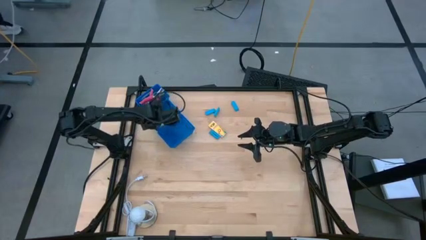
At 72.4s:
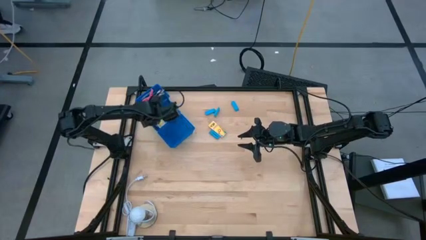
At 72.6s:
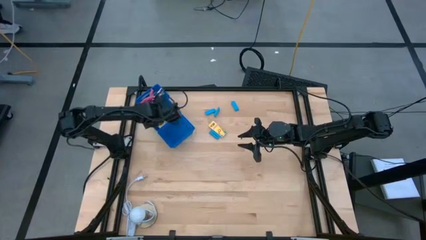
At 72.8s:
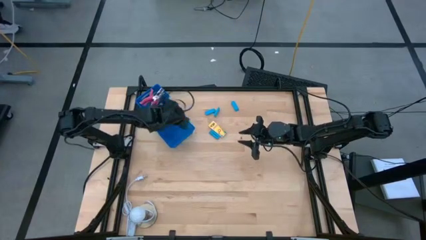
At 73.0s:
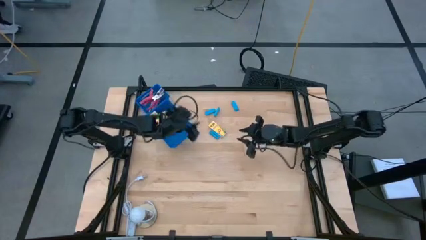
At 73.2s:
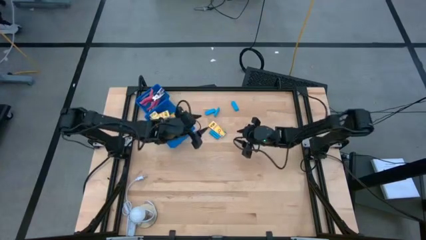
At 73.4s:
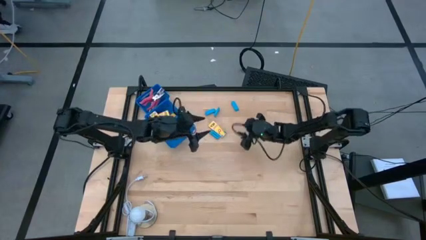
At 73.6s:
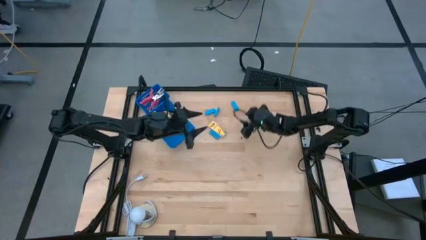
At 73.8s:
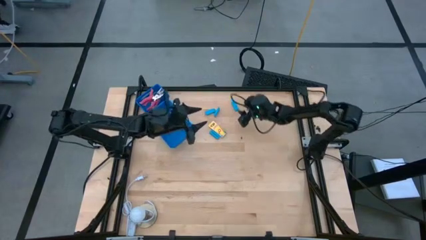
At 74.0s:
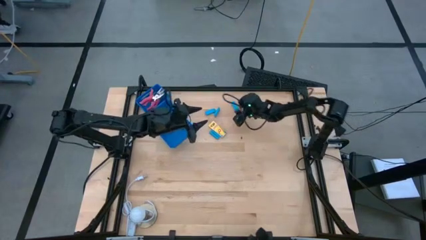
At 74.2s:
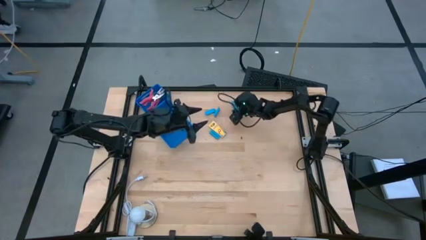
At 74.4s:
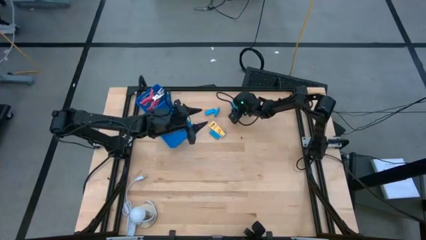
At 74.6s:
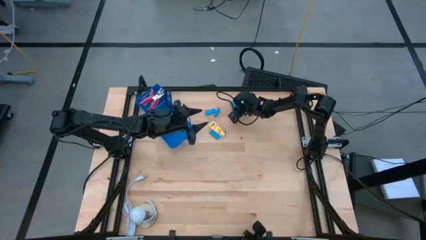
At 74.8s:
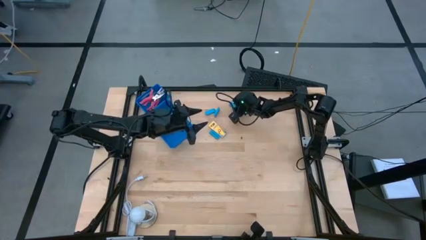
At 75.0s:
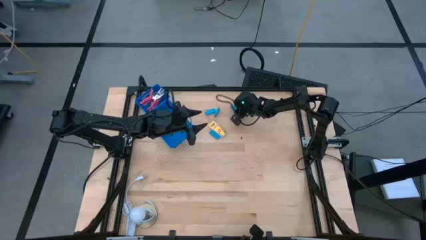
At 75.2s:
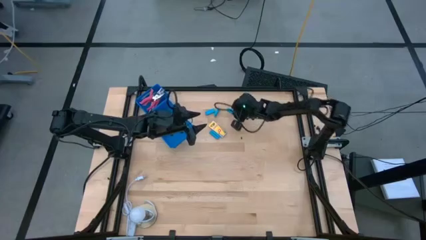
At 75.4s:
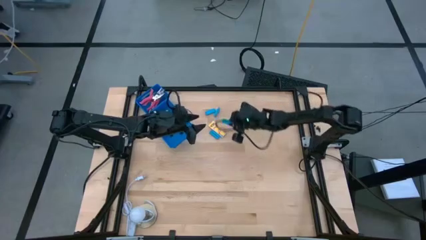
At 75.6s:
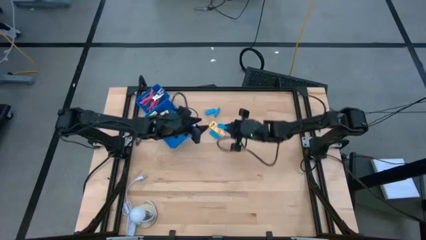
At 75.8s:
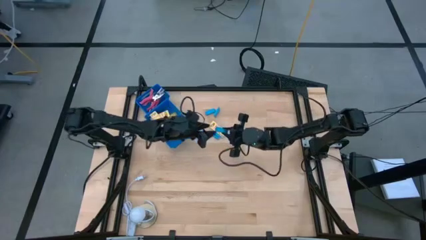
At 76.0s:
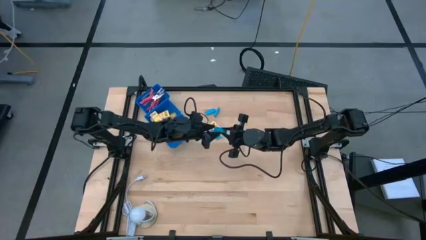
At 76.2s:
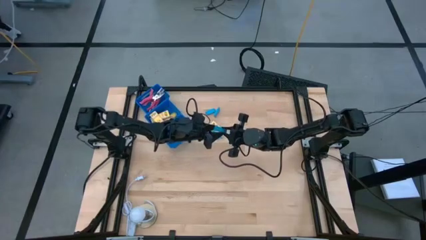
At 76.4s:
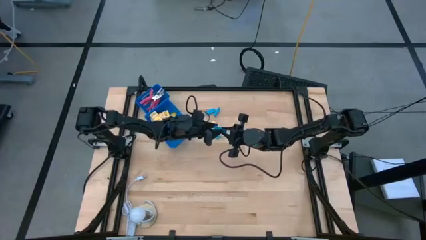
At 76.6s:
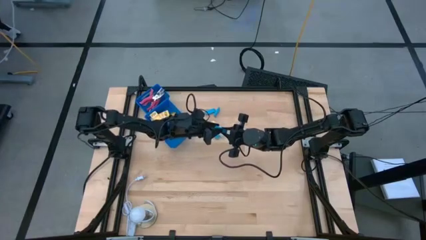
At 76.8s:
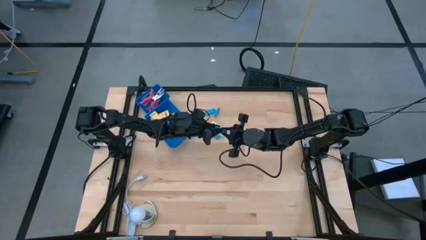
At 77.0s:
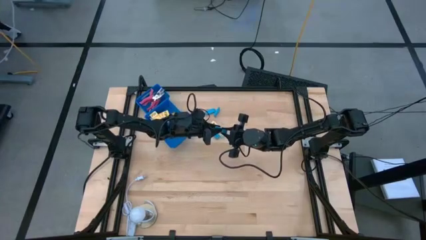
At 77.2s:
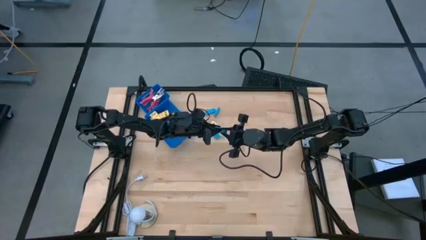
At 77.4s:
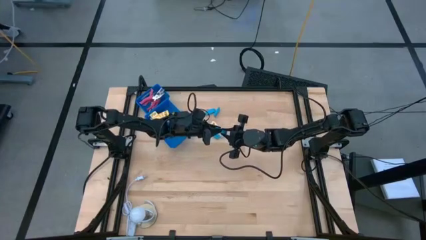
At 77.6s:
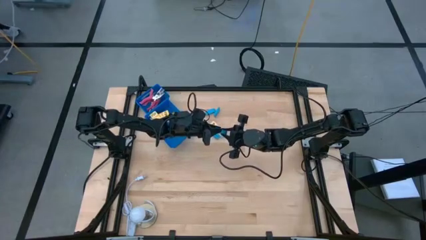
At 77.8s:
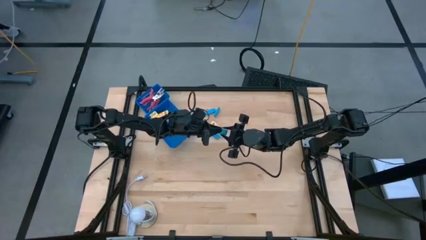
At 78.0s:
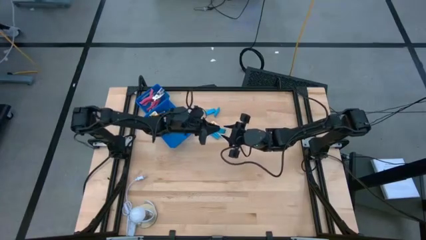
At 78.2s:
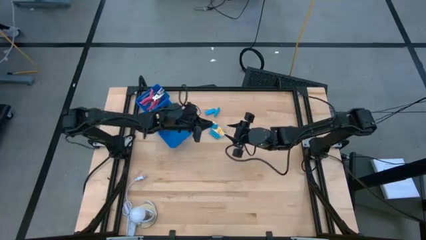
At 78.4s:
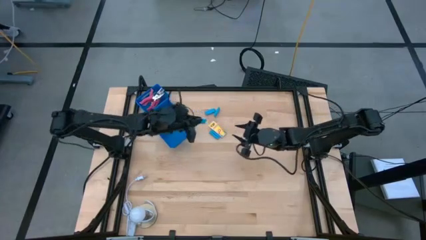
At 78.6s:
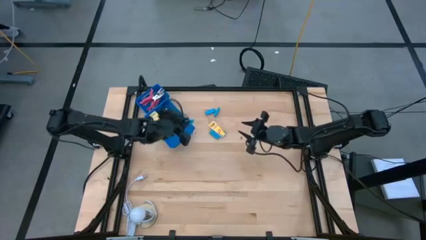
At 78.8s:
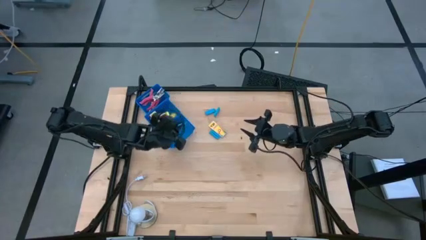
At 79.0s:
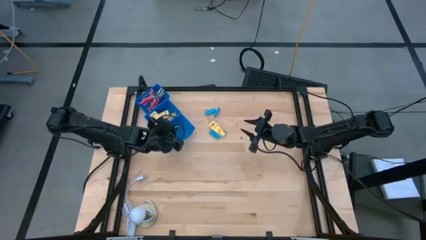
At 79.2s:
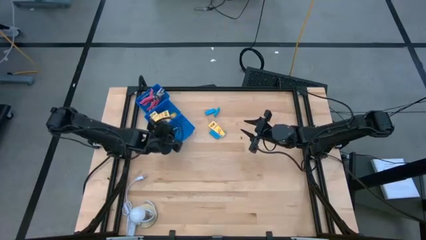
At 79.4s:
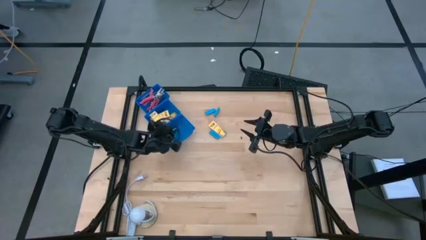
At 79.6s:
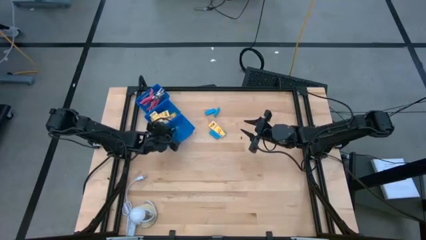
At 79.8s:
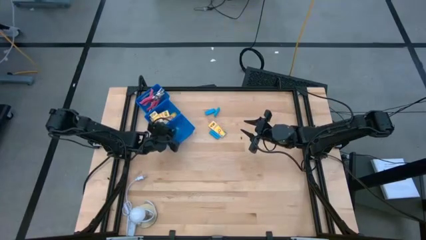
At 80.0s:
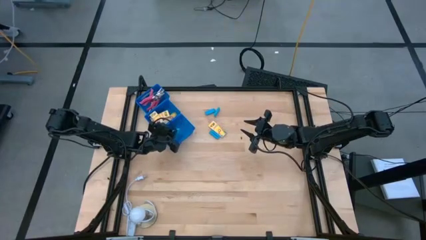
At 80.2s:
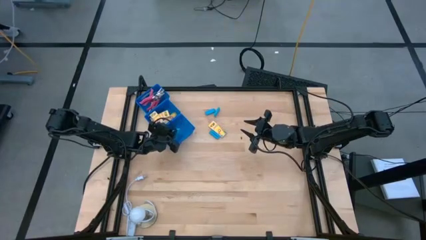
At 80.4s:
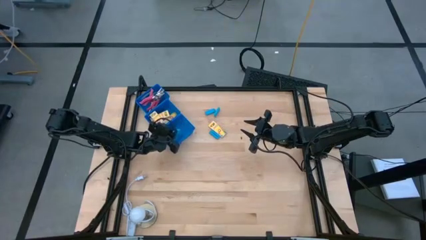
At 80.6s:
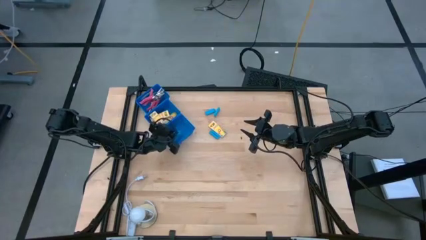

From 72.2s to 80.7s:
Task: Pick & Place School Supplies
Put the blue eraser into the bottom blue bin

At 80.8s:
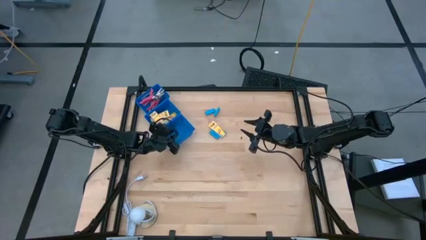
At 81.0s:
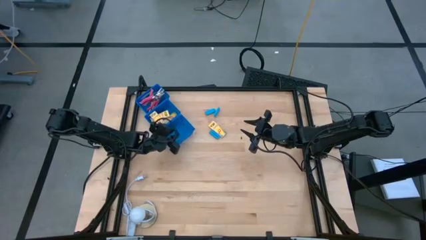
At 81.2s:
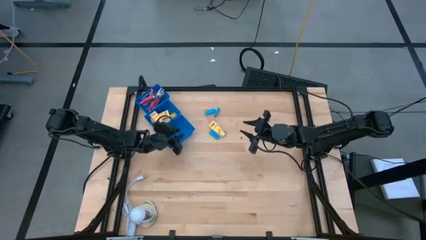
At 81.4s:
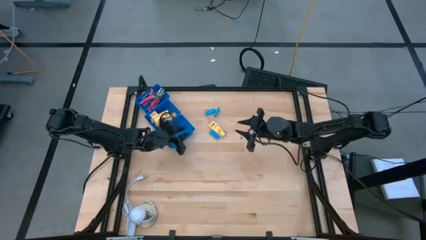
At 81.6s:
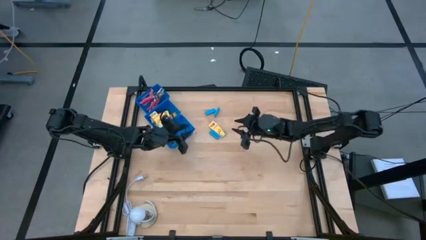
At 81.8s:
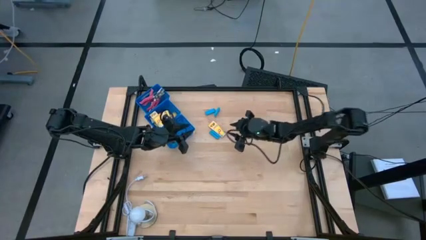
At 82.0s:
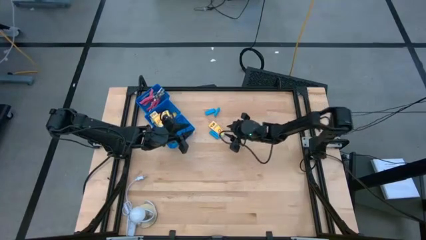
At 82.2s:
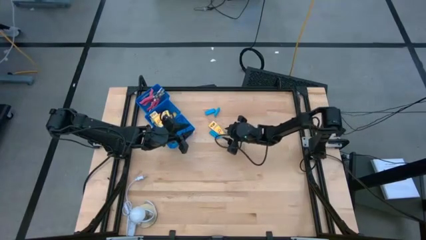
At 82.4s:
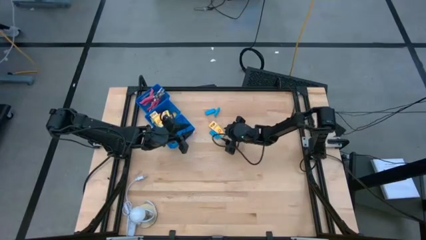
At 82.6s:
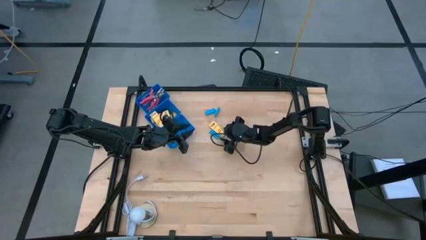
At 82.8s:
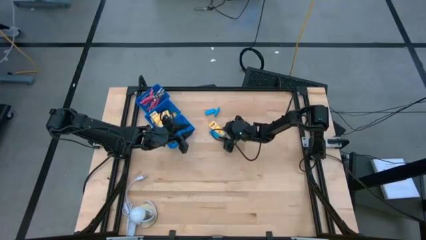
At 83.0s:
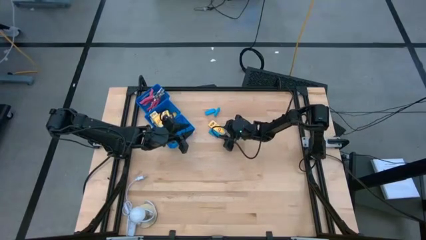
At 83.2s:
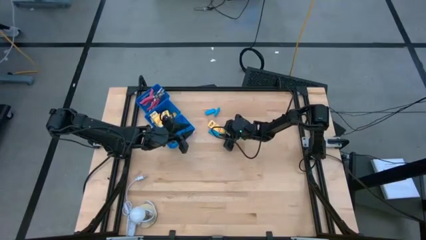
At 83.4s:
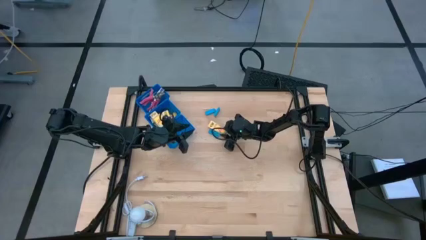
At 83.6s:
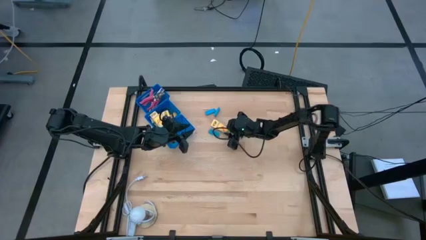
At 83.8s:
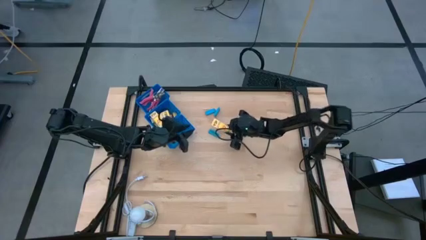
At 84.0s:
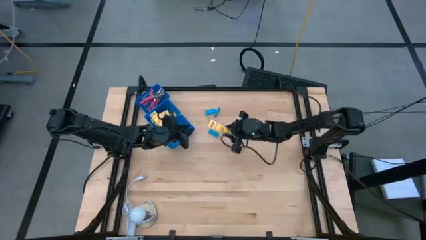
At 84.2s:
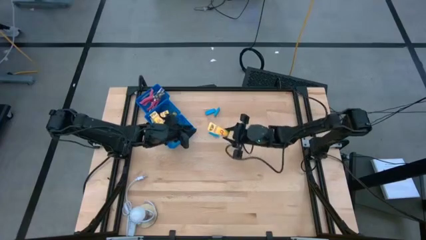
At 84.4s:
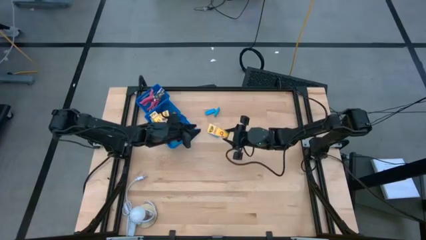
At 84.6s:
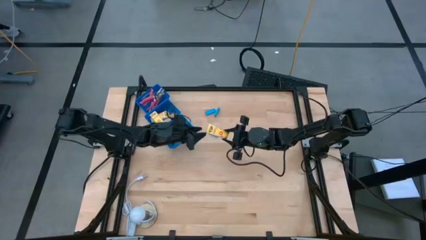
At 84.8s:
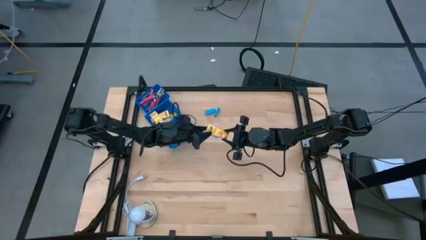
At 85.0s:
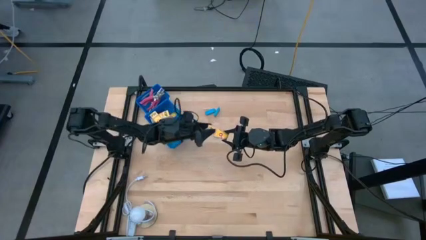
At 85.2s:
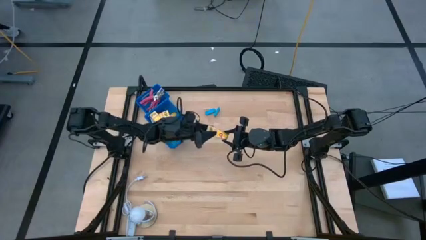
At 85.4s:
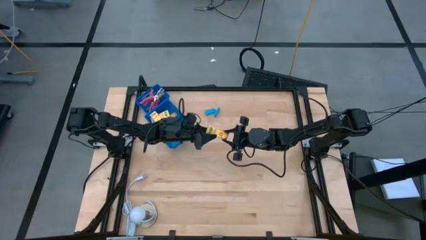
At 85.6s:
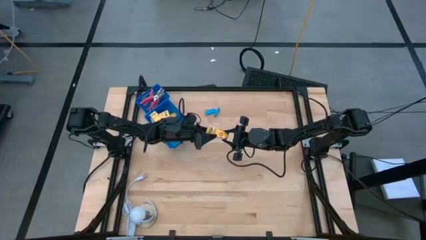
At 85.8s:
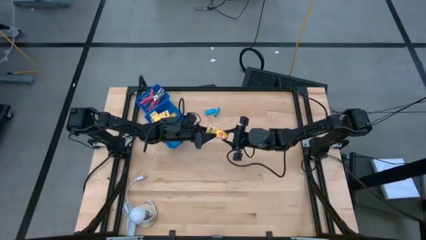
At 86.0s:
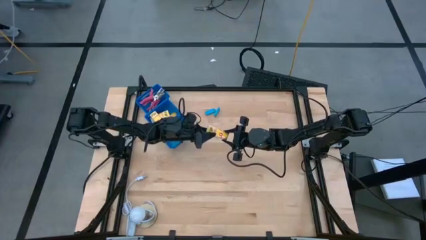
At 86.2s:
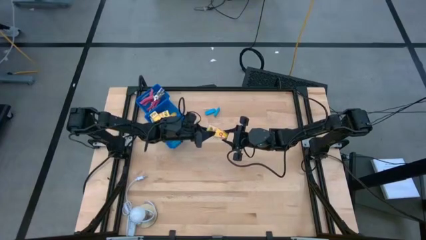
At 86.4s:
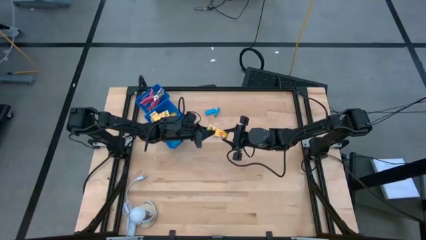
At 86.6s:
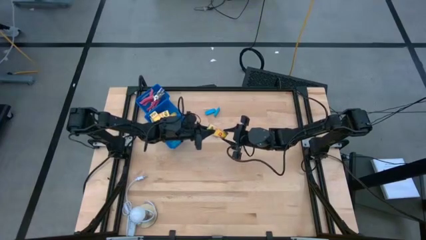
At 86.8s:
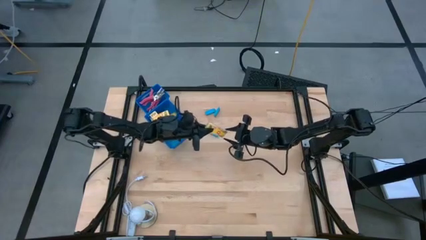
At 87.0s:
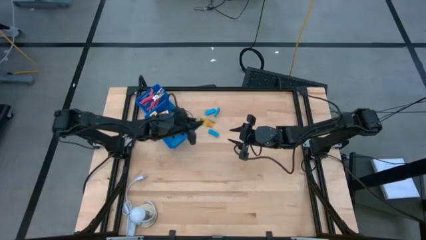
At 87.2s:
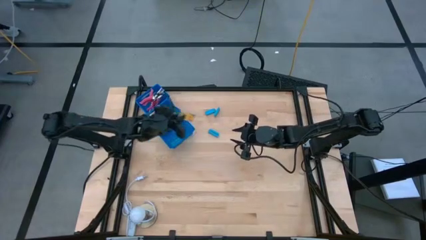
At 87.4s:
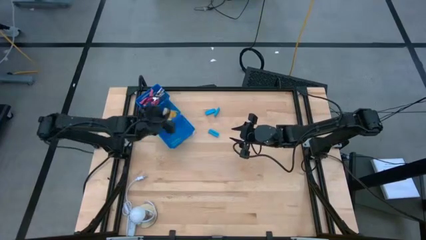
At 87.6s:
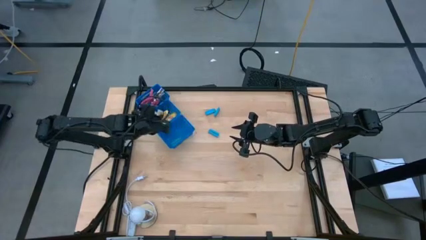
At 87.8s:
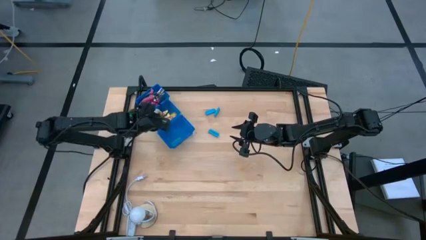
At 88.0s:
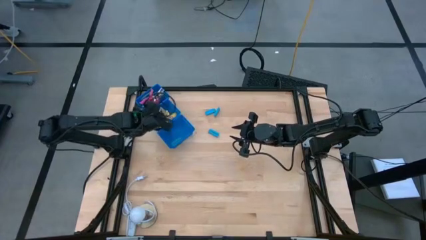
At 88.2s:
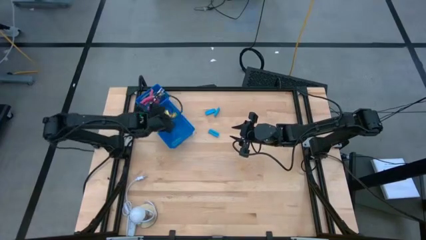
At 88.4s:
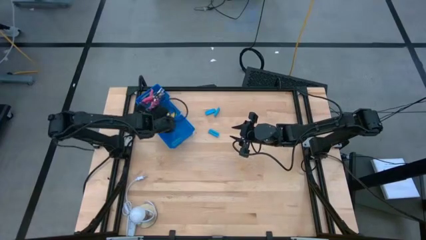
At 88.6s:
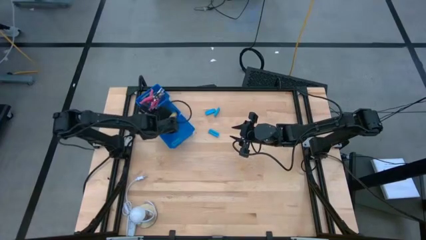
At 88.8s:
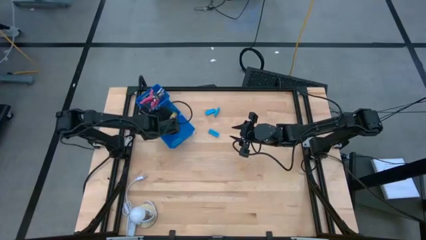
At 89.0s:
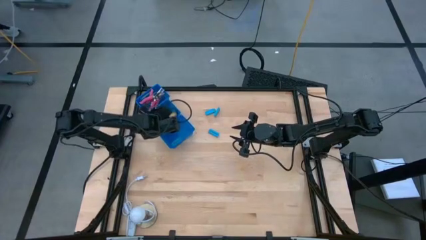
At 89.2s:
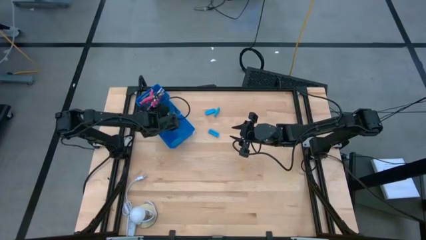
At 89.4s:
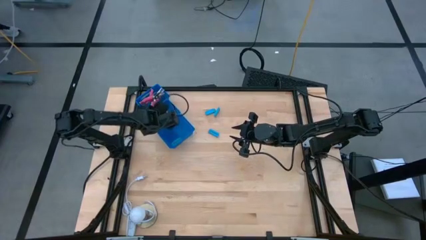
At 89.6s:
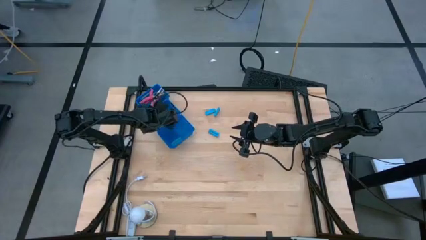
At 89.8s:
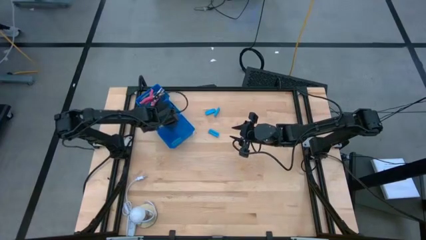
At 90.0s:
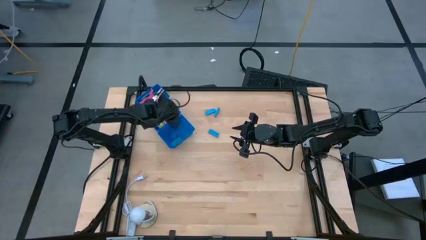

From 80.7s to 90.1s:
Put the yellow crayon box into the middle blue bin
